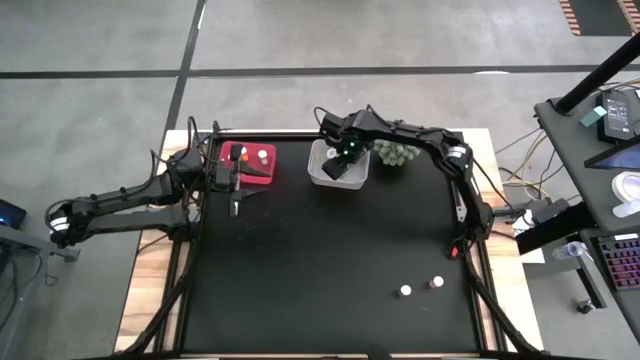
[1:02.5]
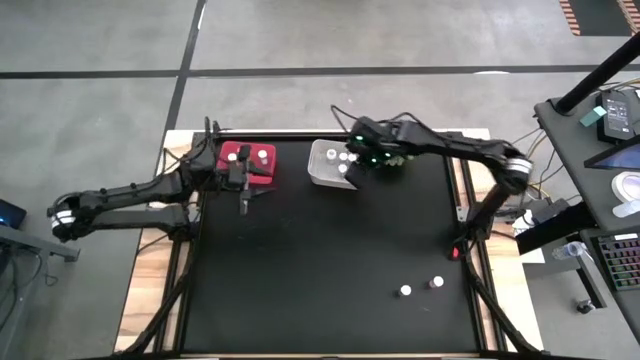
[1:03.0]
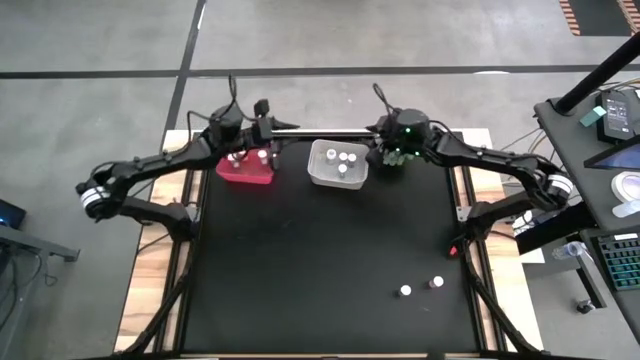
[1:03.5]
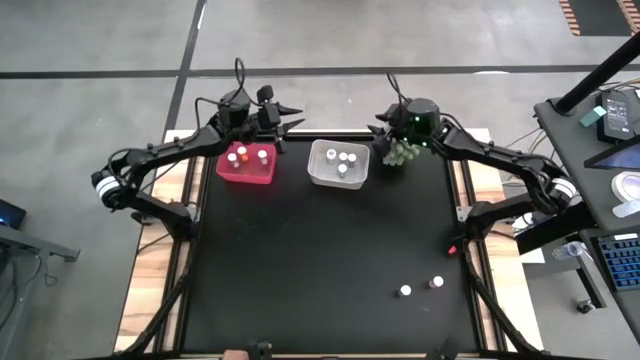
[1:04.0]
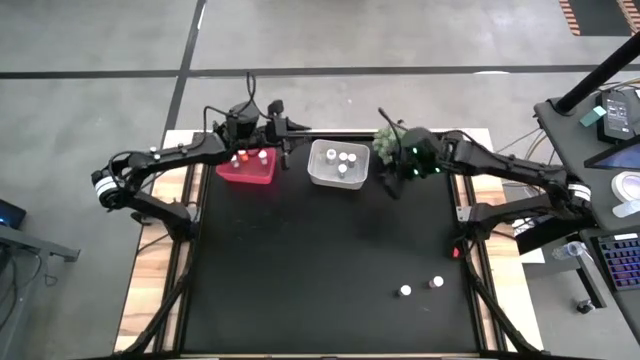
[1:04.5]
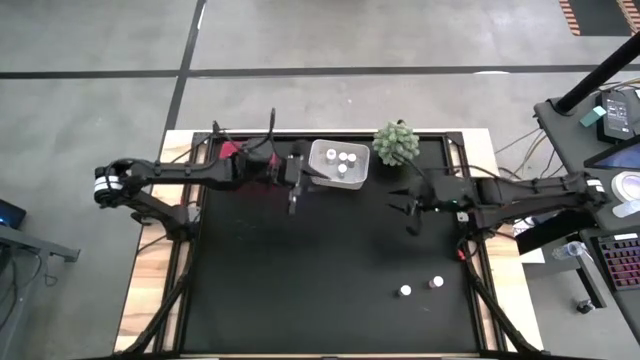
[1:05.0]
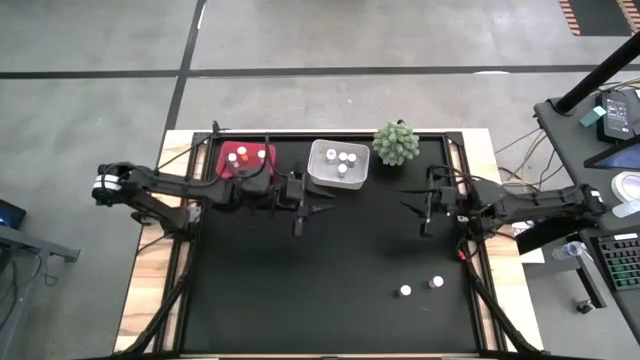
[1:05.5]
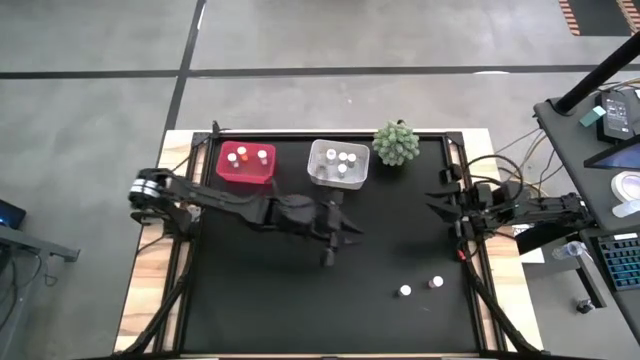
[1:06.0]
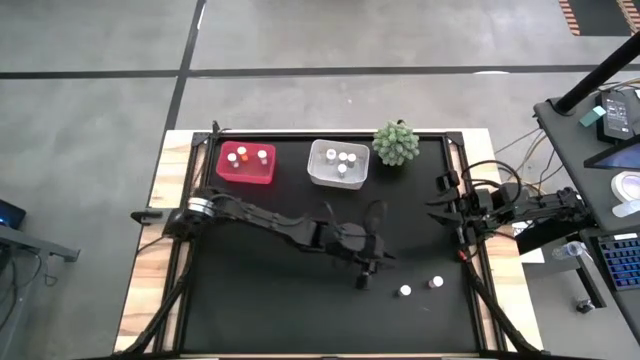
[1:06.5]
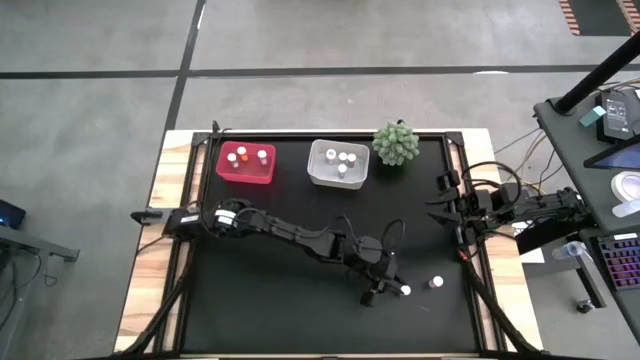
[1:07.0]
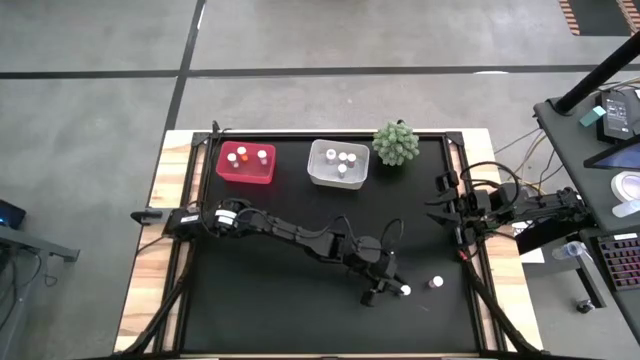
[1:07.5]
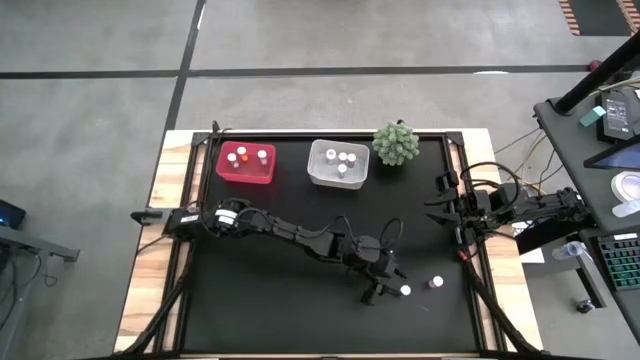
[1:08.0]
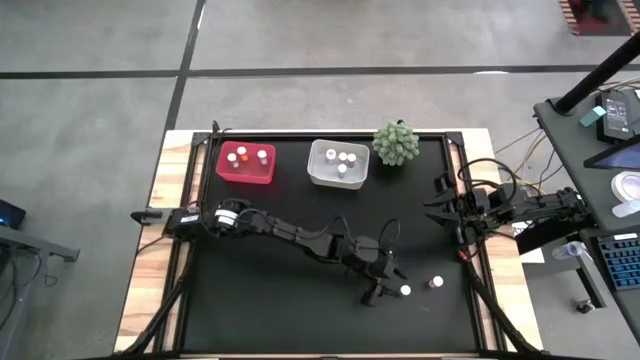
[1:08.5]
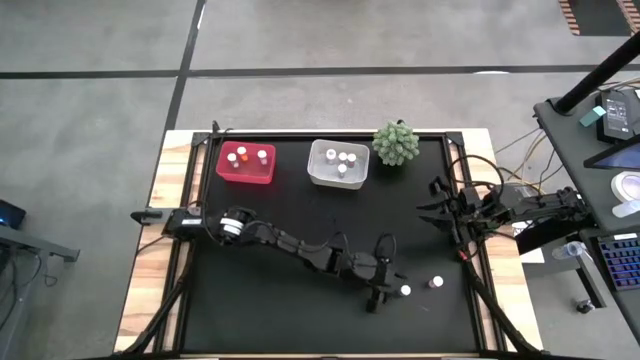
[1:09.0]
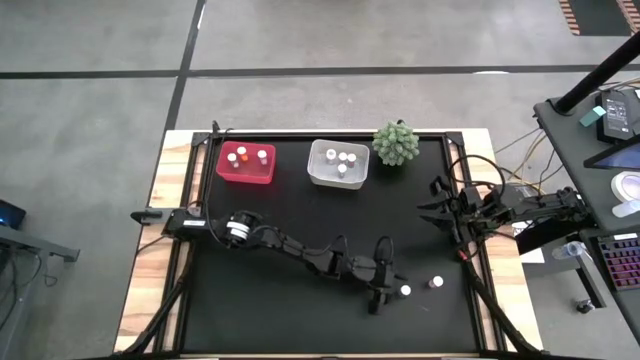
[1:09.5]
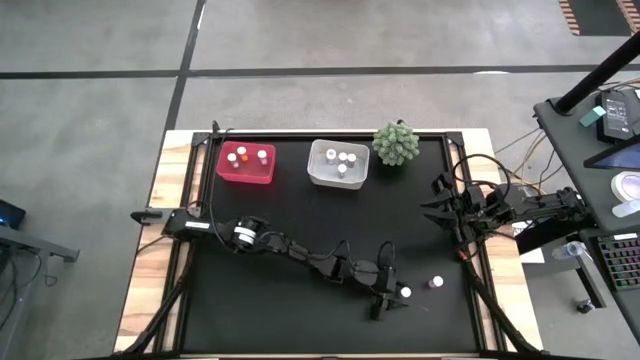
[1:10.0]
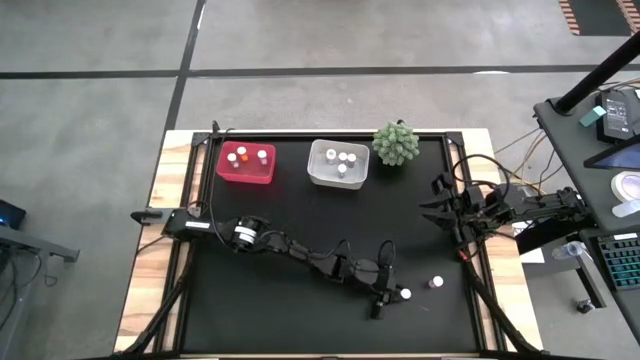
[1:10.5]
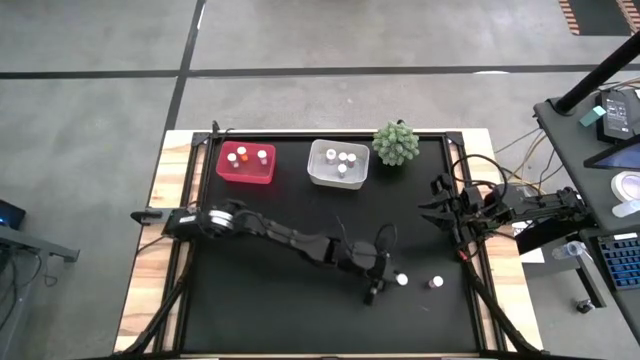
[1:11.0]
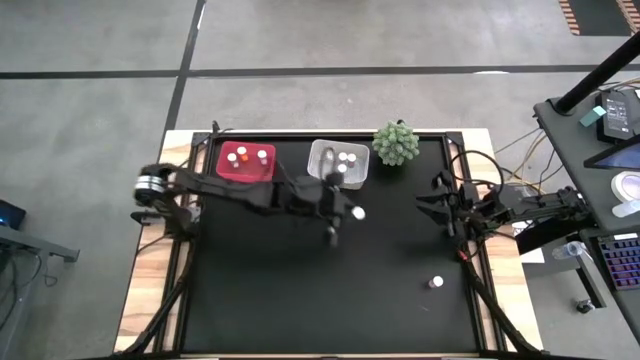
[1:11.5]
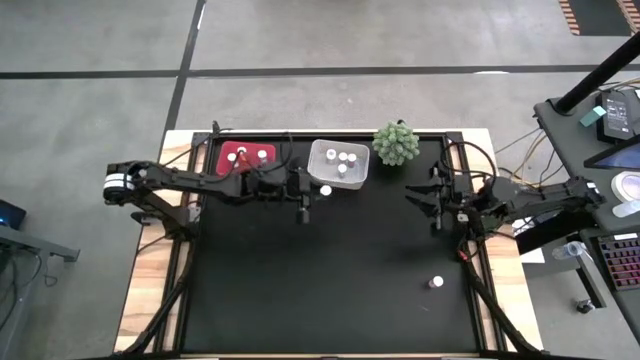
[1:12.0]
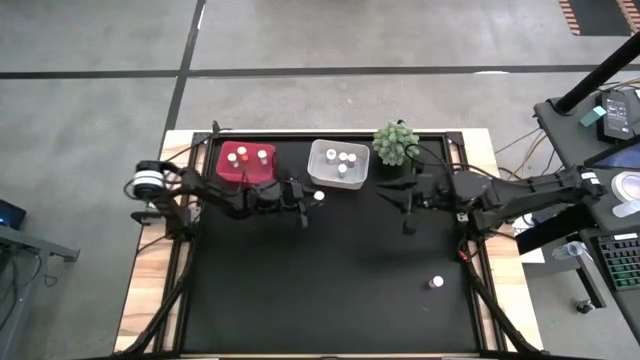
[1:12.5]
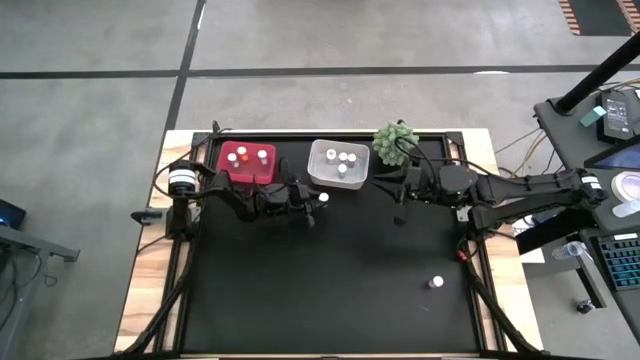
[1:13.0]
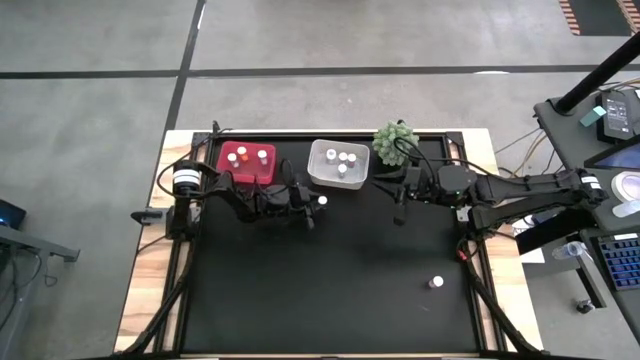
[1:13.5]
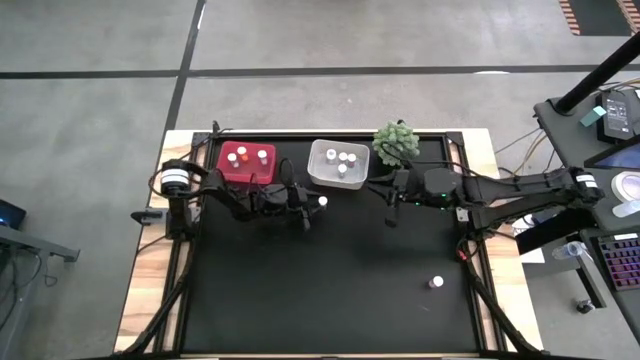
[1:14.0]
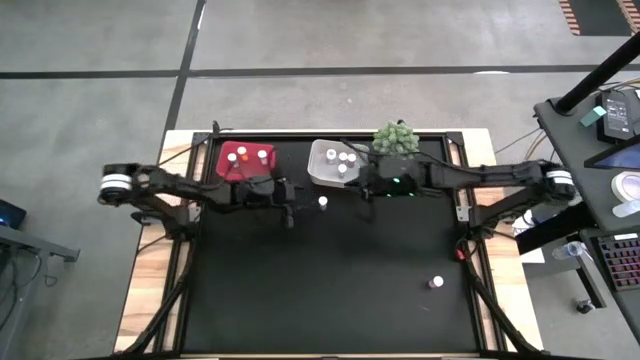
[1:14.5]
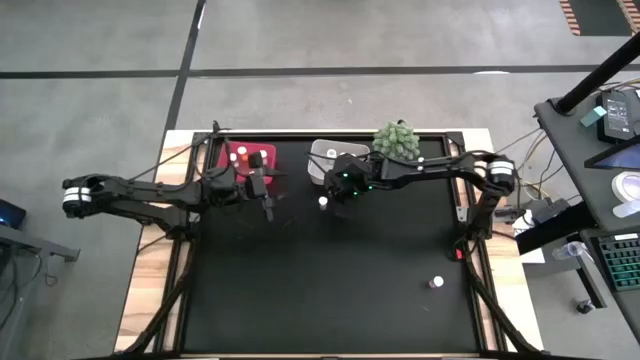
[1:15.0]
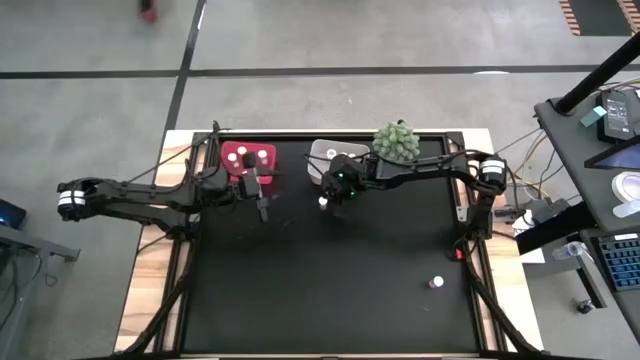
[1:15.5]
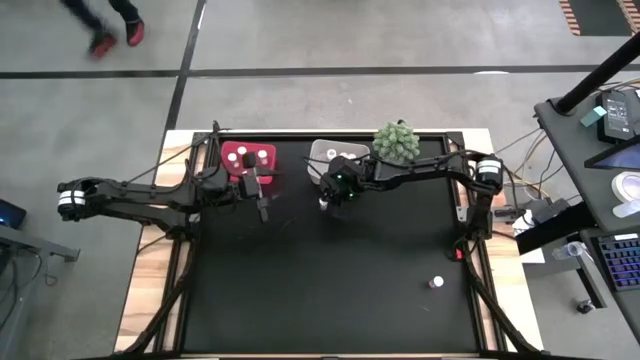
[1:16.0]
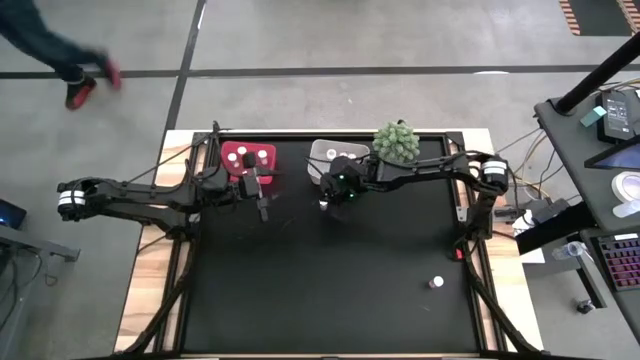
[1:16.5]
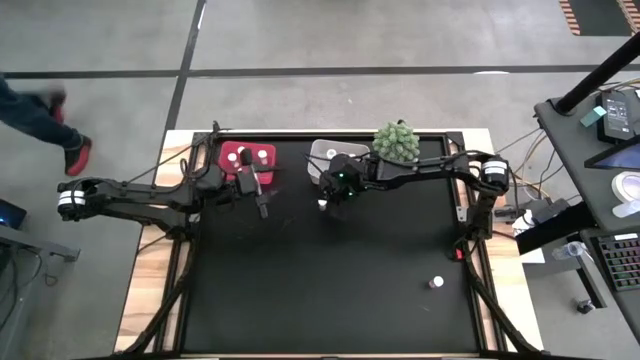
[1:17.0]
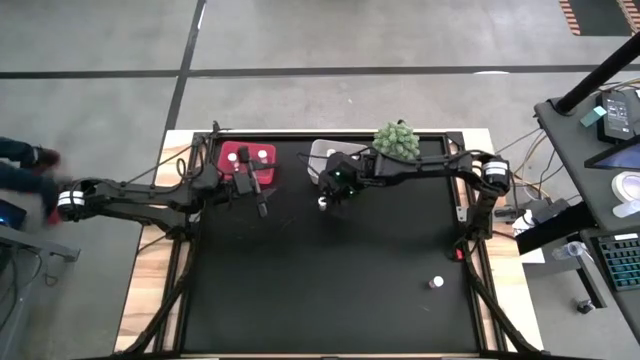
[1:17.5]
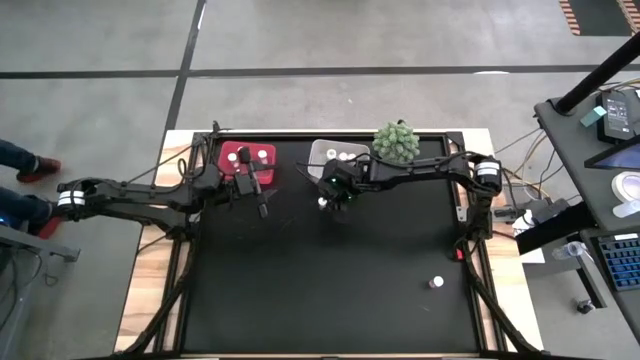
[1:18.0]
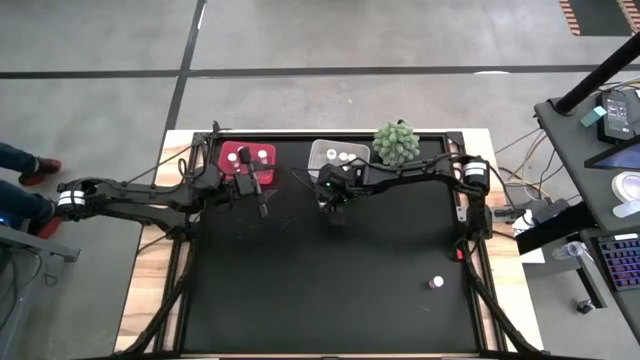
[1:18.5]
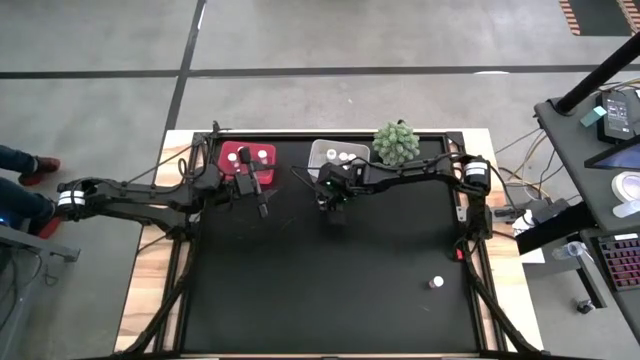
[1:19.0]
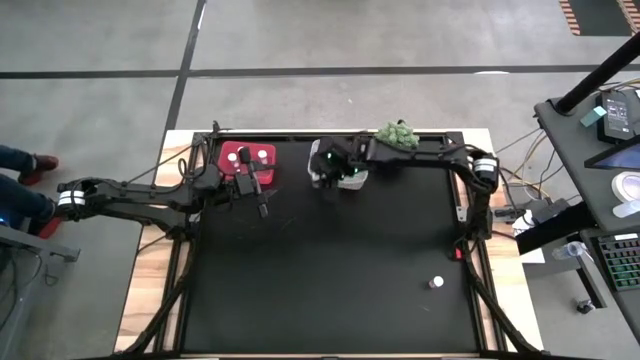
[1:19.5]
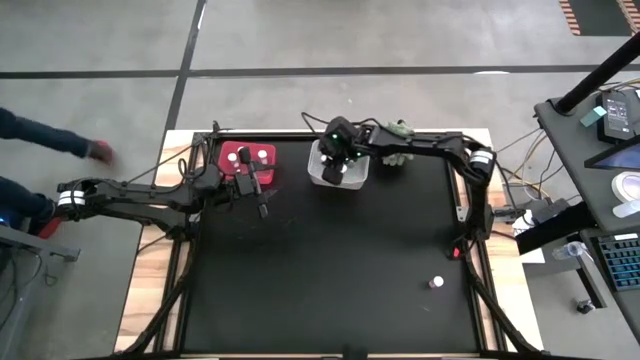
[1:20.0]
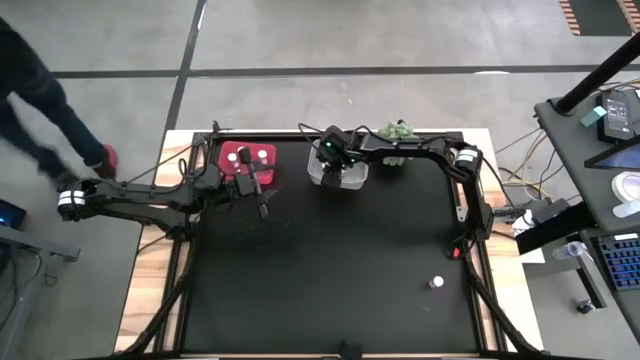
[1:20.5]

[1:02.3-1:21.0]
Task: Pick and place medicine bottles into bin by pill shape (circle, oval)
Put the blue capsule bottle into the white bin

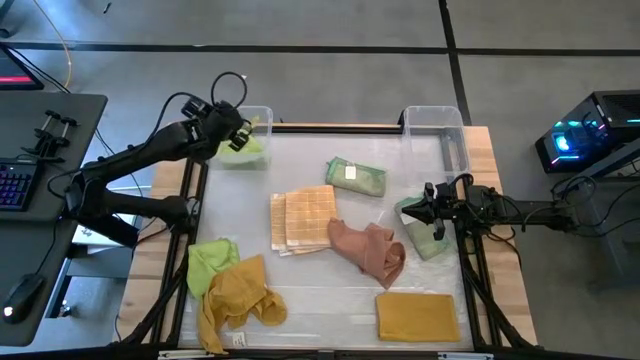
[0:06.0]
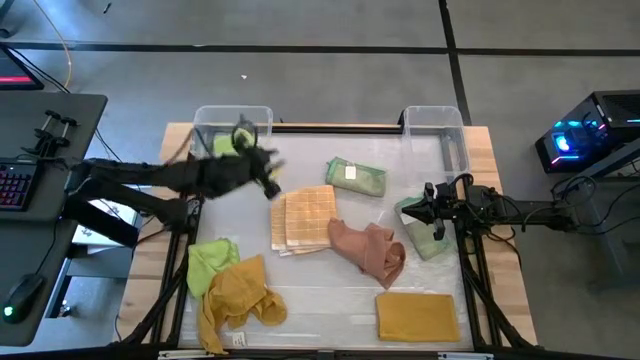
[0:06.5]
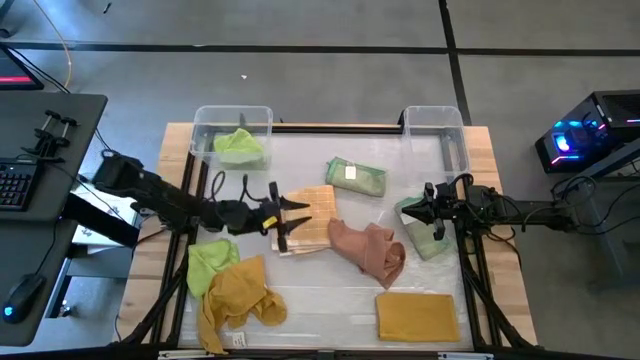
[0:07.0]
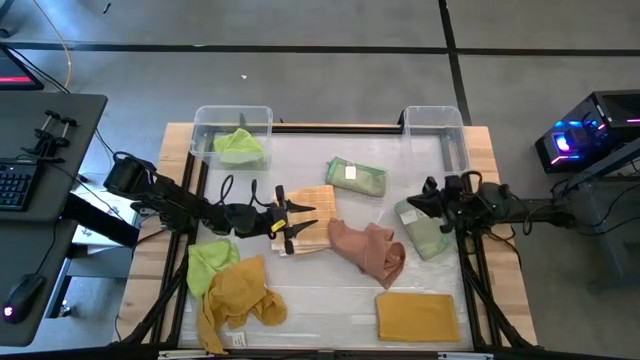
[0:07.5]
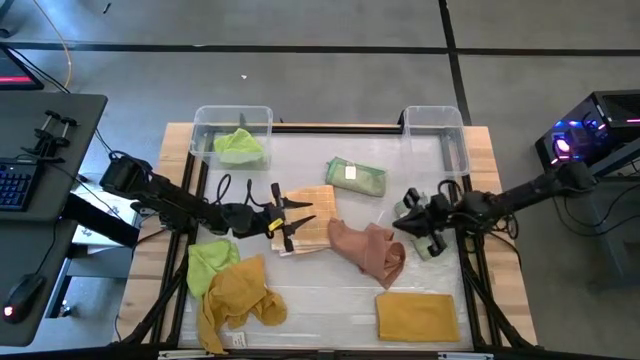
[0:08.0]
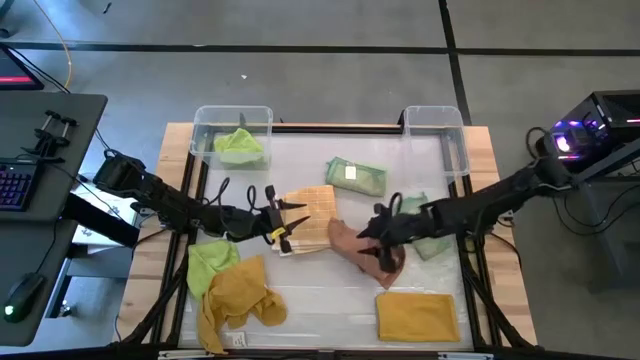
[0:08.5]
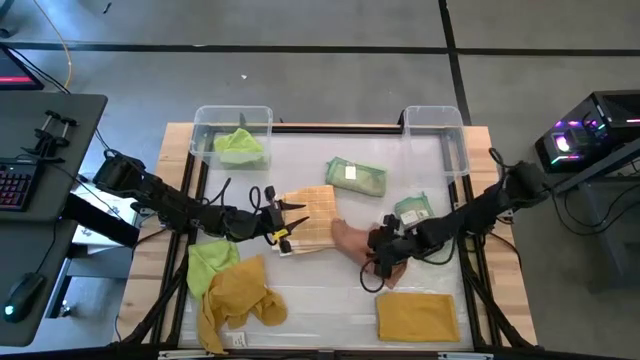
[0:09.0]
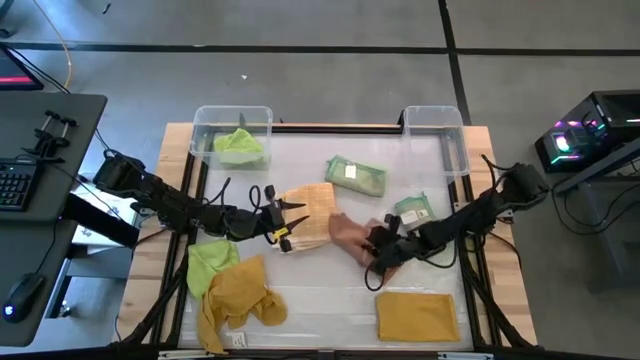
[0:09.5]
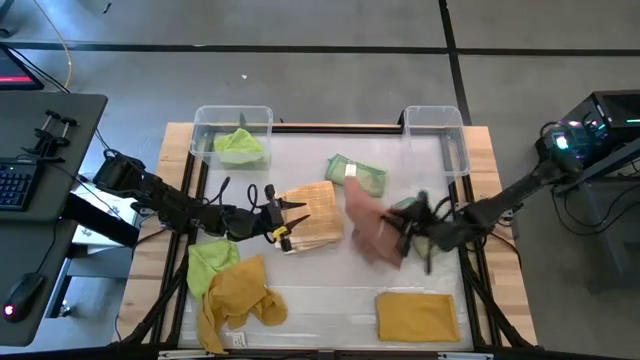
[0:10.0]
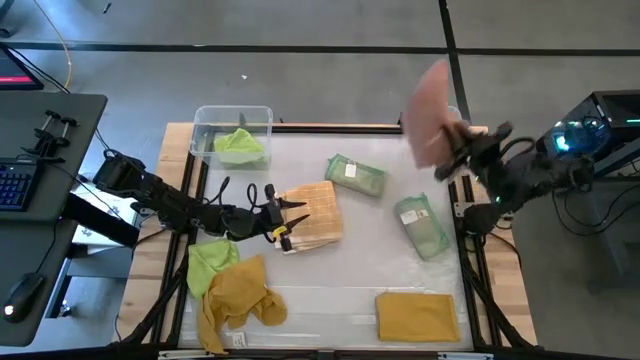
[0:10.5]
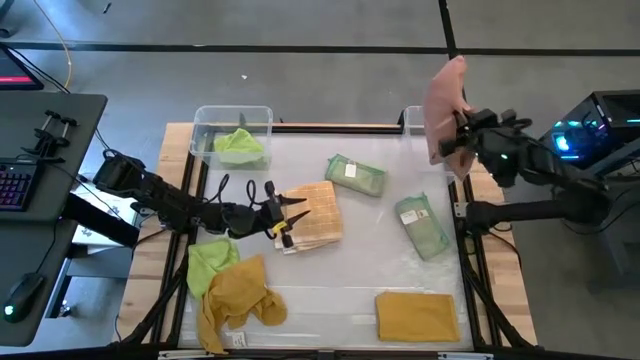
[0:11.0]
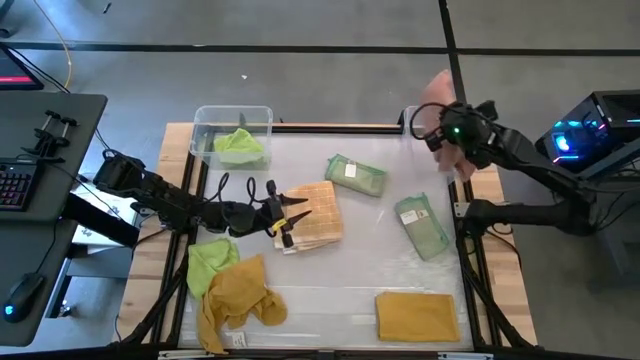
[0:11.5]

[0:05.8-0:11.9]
Task: Sort towels by color in basket
Put the brown kitchen towel into the right transparent bin
